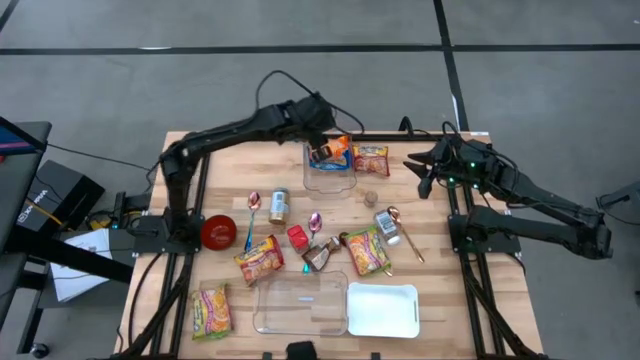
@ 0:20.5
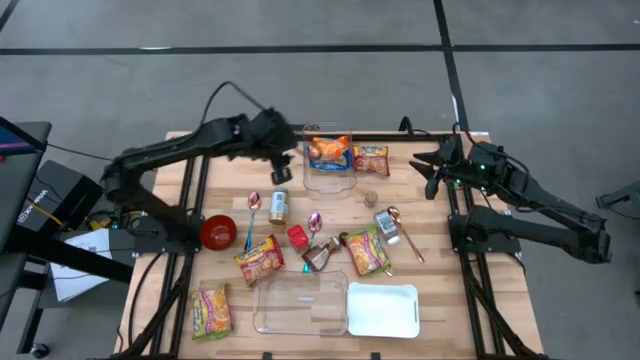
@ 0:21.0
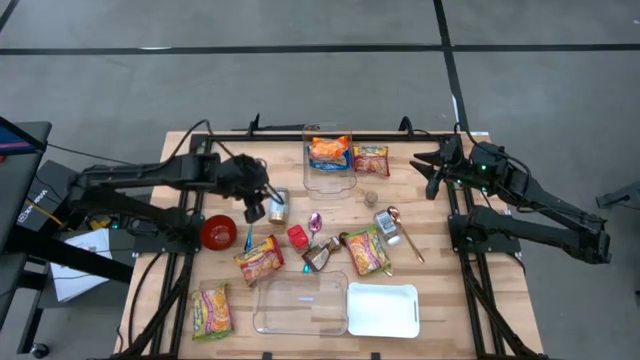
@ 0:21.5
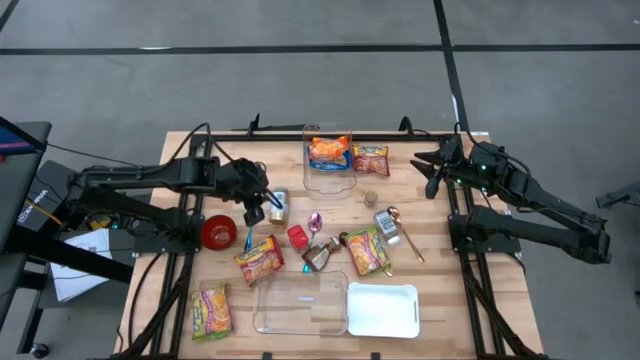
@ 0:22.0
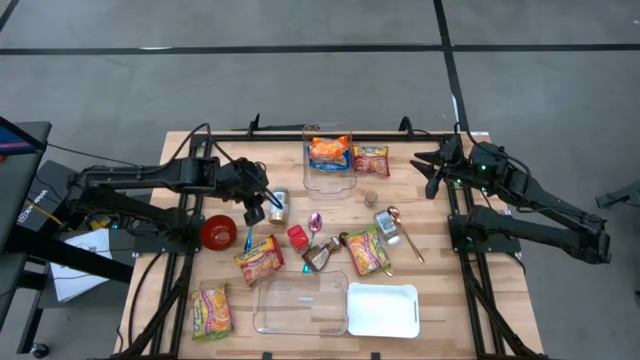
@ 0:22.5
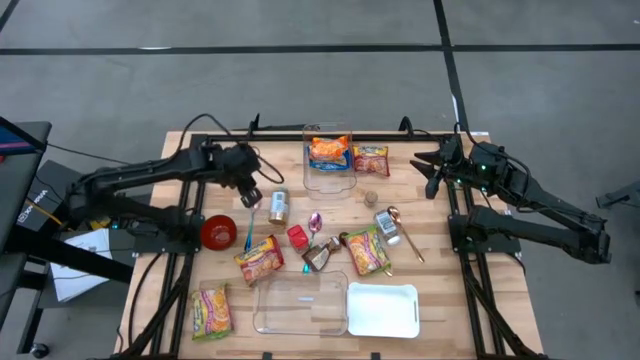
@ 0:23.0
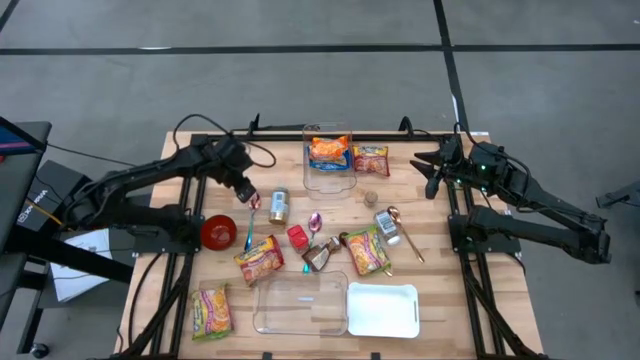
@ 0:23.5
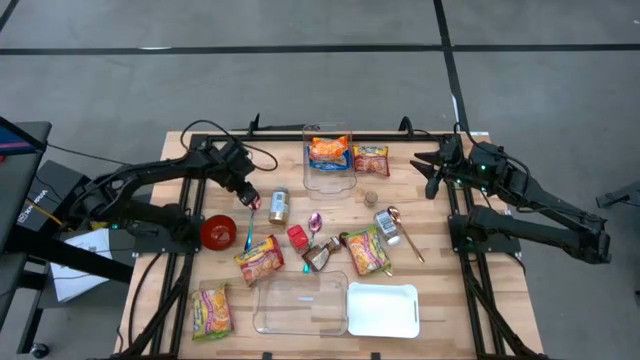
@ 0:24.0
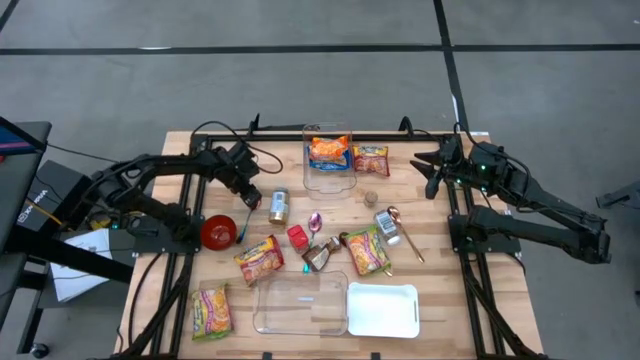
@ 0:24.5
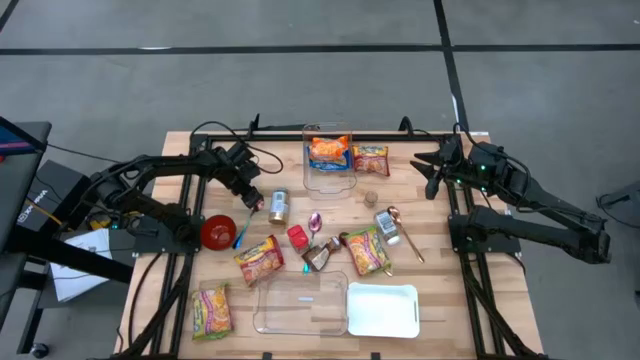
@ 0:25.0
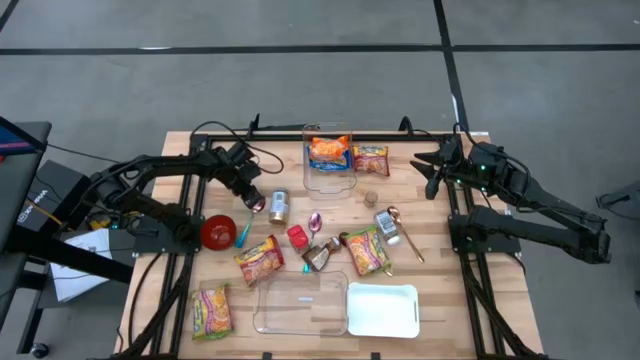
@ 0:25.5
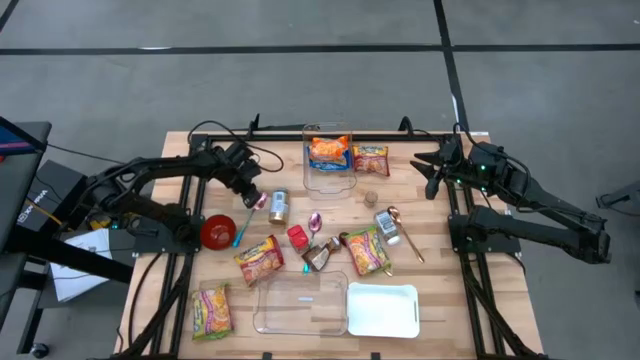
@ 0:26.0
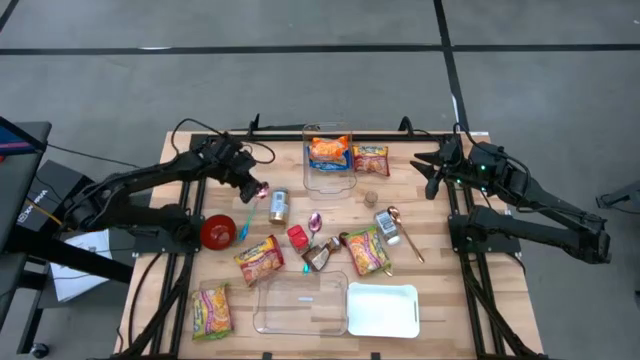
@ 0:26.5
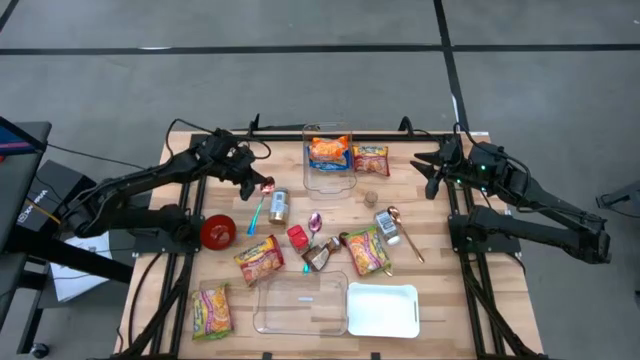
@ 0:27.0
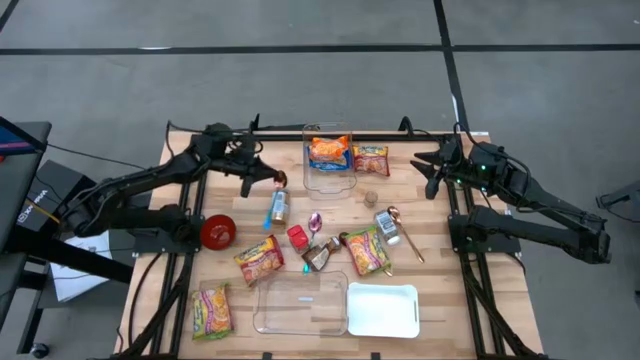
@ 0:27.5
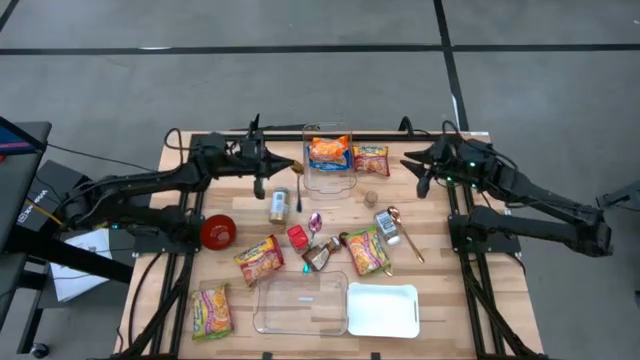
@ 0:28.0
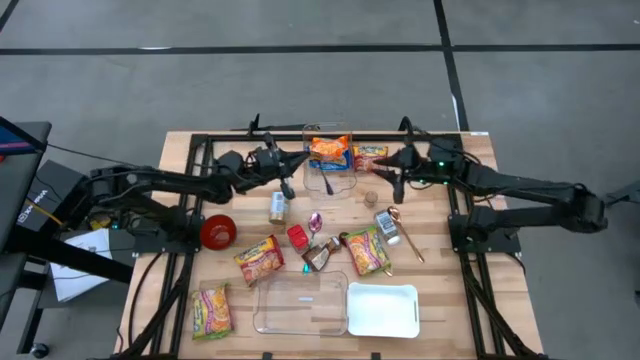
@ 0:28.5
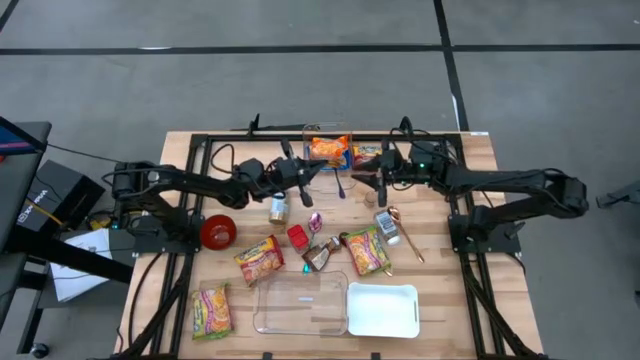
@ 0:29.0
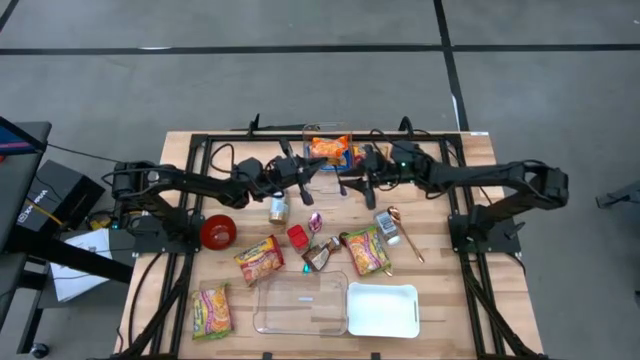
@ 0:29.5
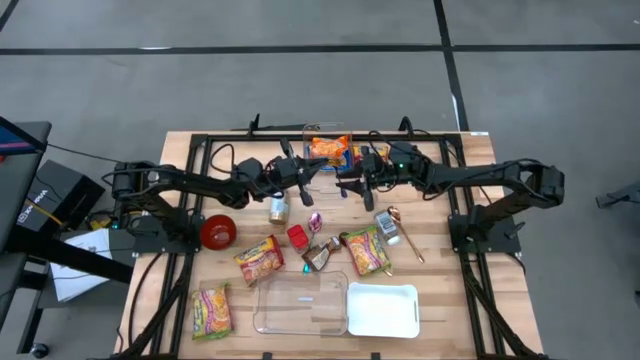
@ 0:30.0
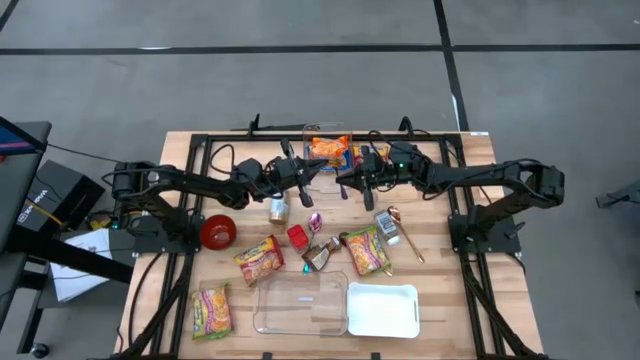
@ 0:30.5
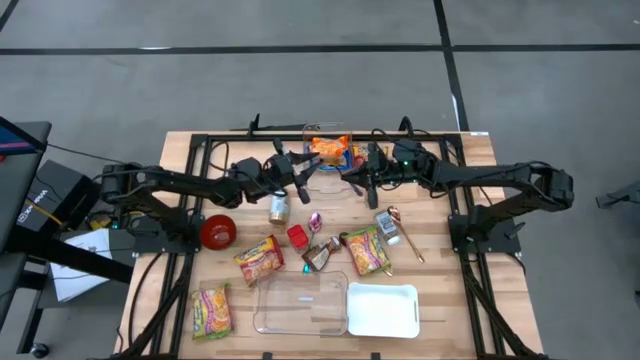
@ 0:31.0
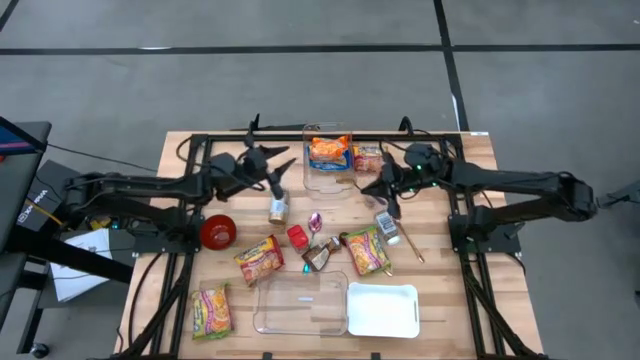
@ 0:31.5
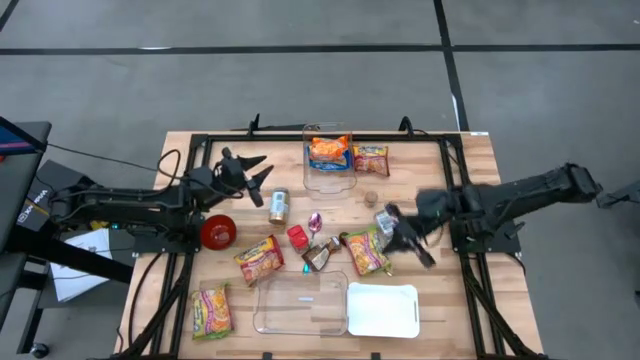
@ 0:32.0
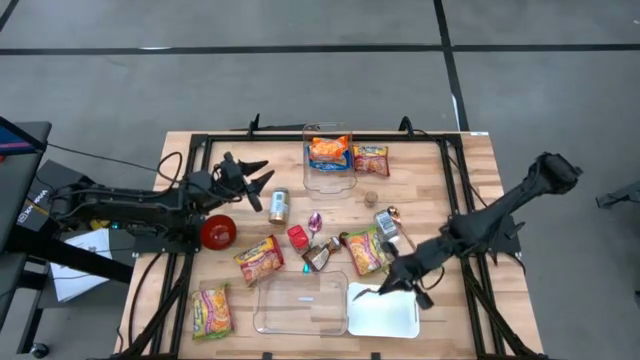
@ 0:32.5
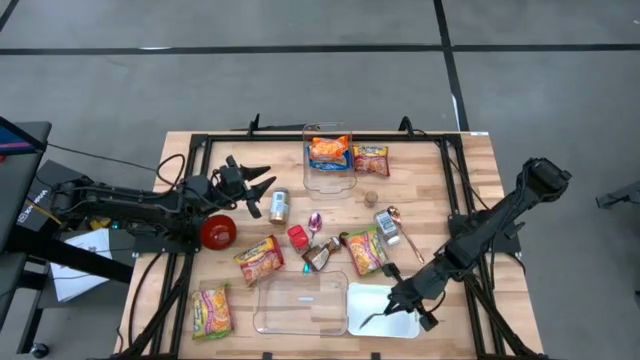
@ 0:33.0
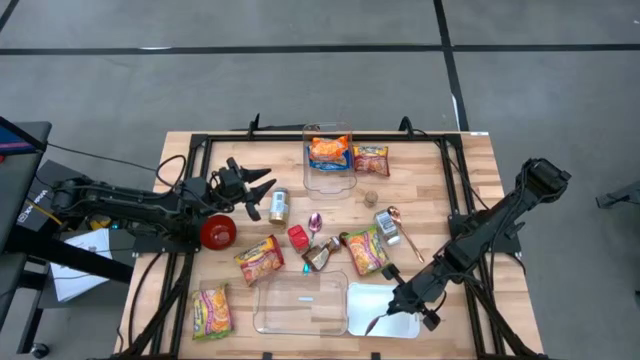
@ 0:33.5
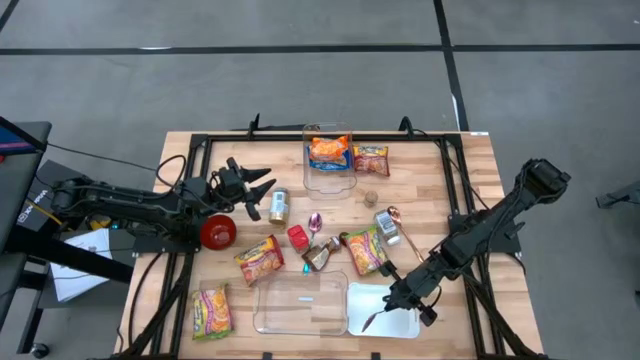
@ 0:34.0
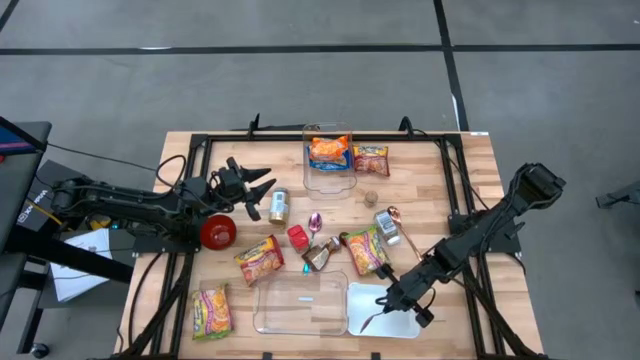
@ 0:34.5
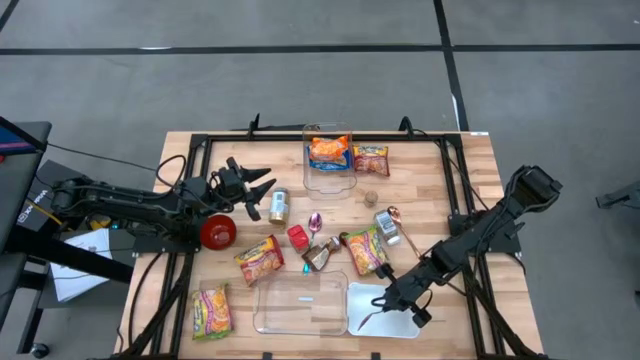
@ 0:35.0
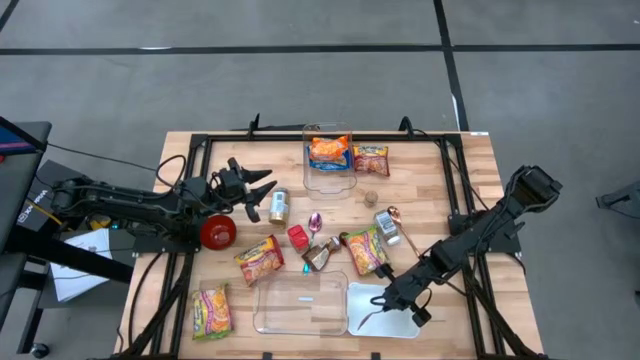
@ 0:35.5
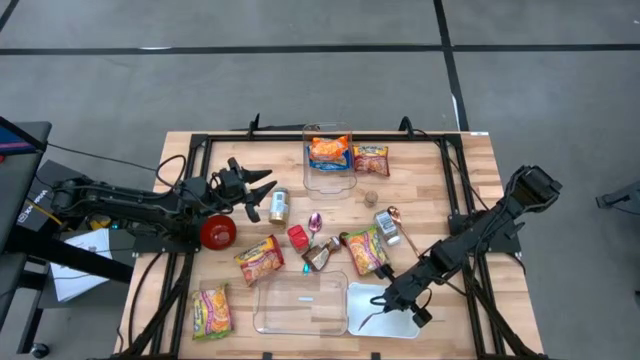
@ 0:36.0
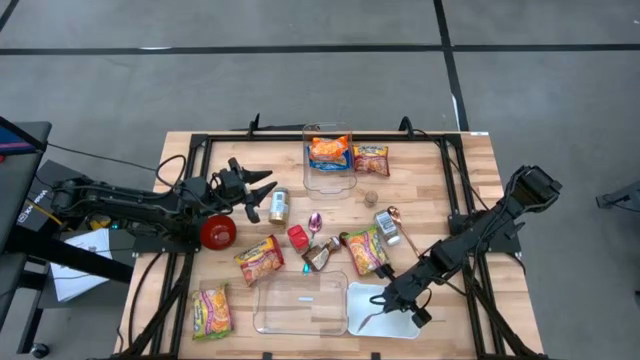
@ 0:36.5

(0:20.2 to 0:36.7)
Task: Pick & Place Food Item
Put the left blue spoon into the white bin

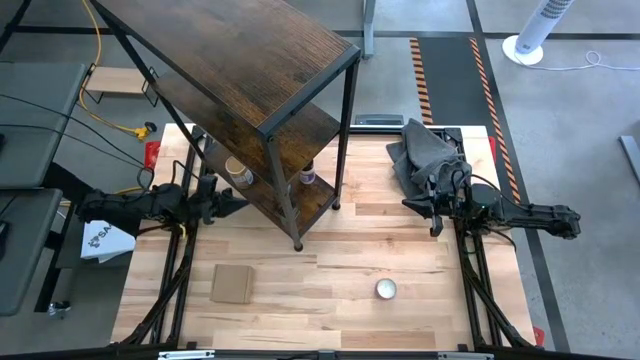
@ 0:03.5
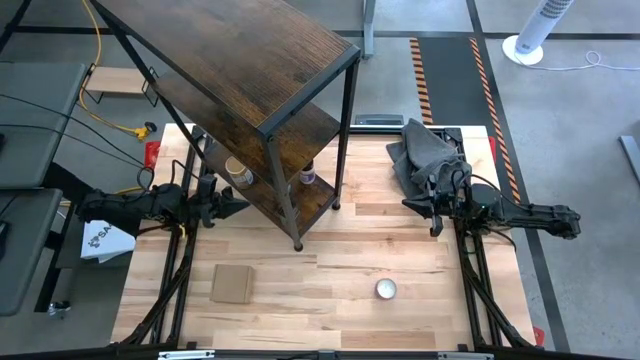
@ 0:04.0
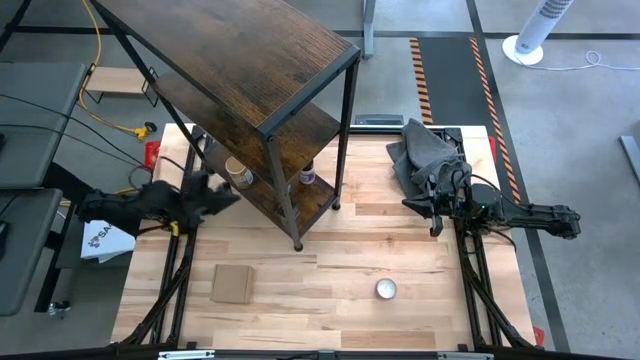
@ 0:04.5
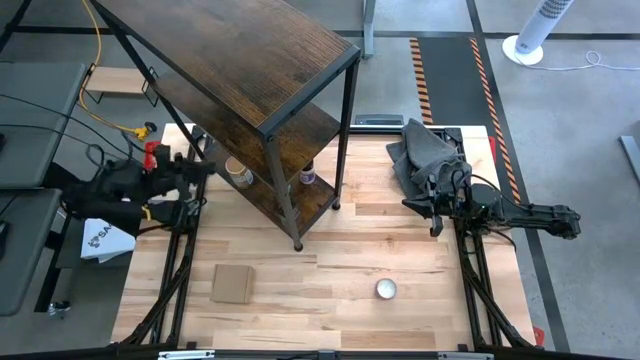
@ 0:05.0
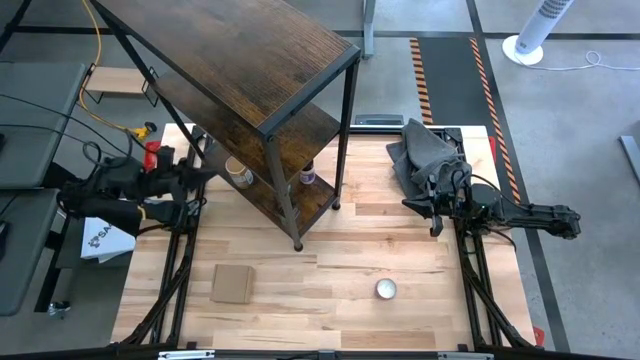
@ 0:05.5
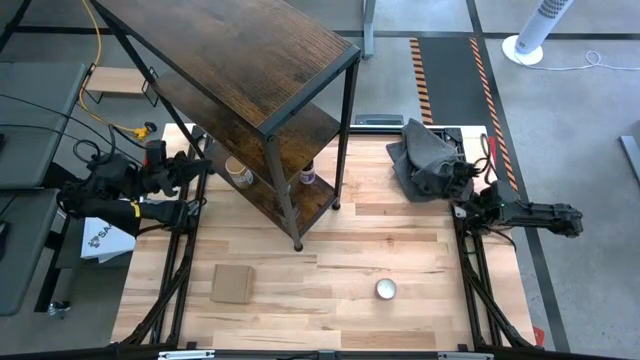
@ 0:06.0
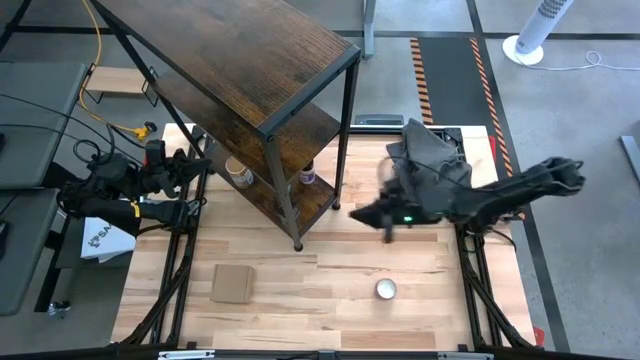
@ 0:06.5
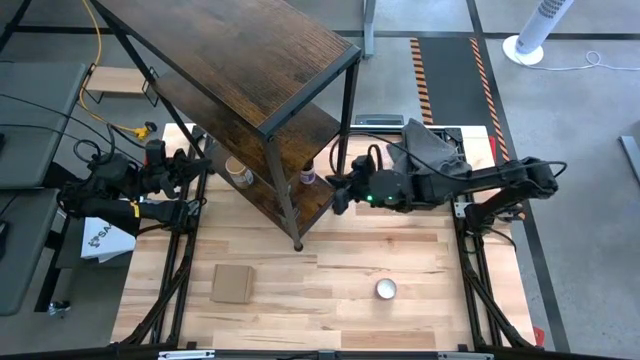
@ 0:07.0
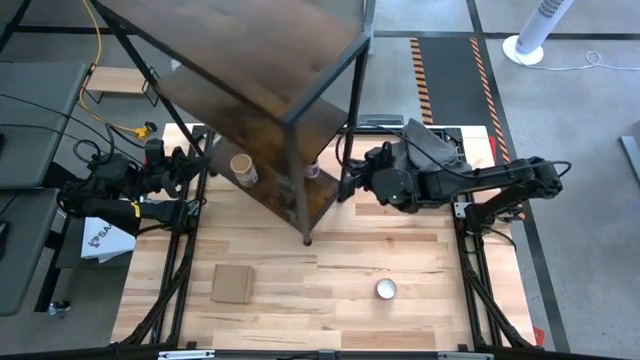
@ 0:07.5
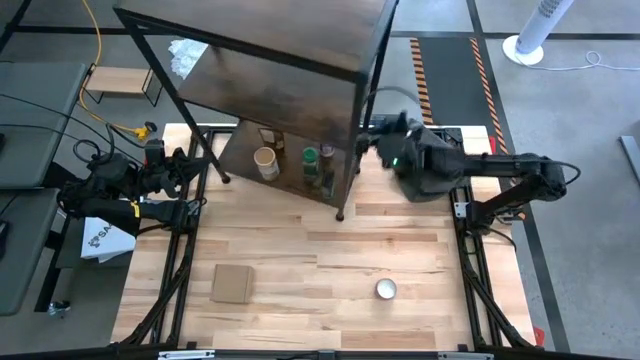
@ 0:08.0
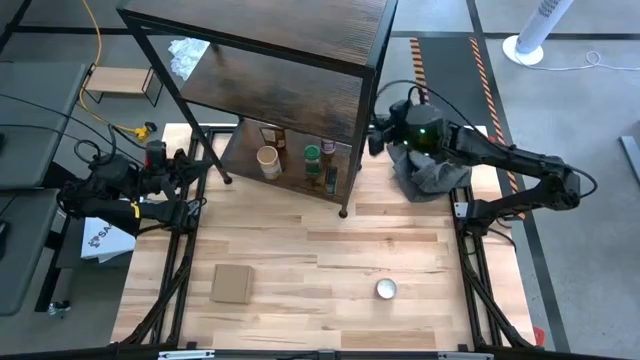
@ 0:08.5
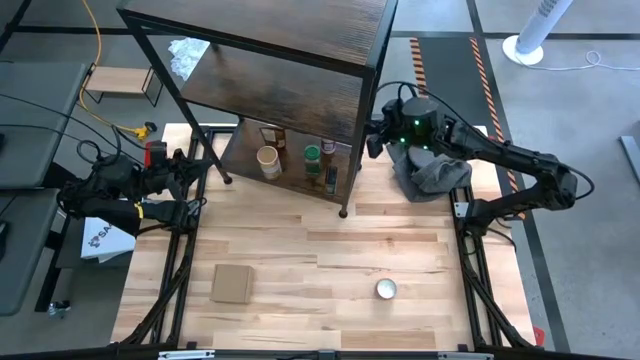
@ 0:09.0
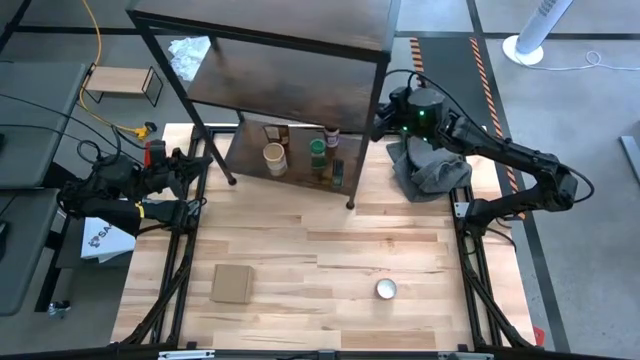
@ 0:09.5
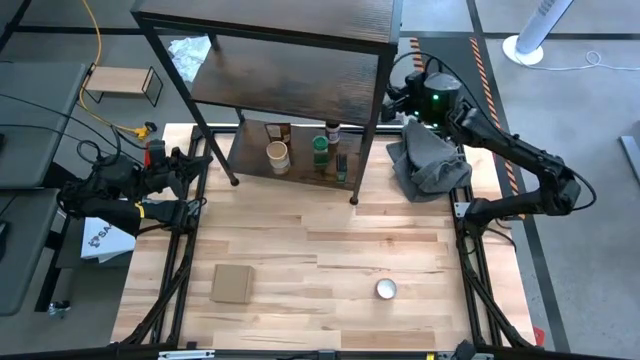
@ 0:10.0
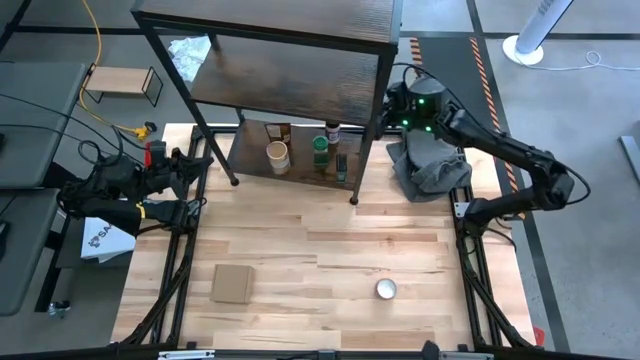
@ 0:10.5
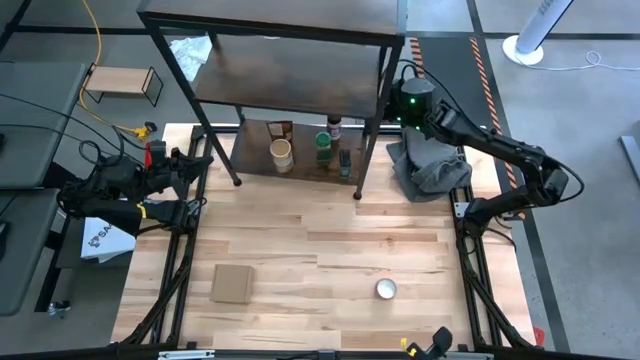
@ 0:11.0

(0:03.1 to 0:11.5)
Task: Shelf spices
Adjust the shelf
